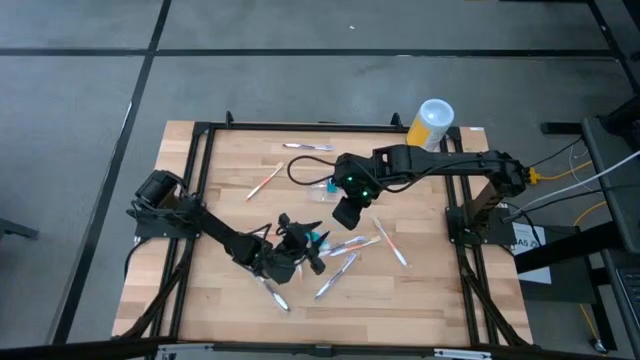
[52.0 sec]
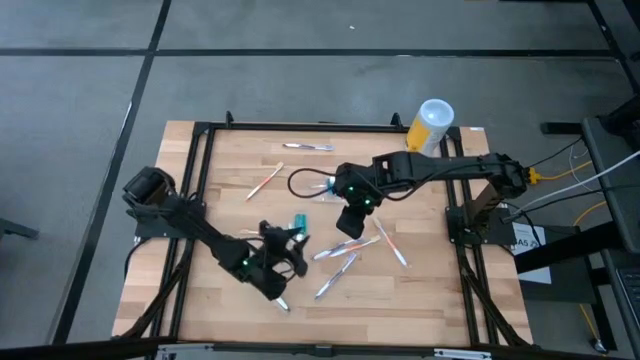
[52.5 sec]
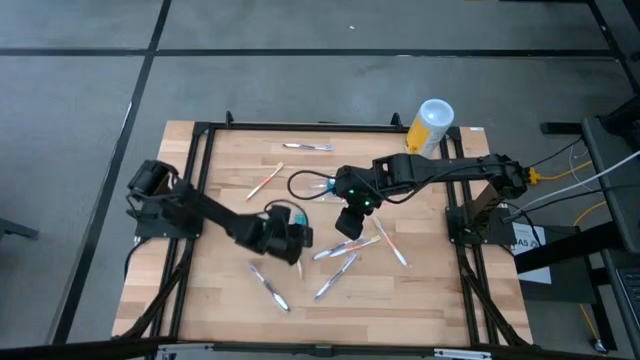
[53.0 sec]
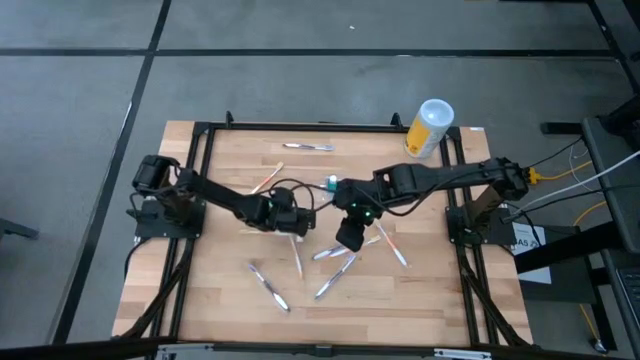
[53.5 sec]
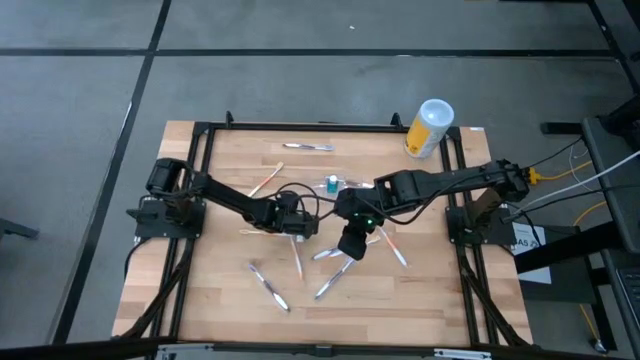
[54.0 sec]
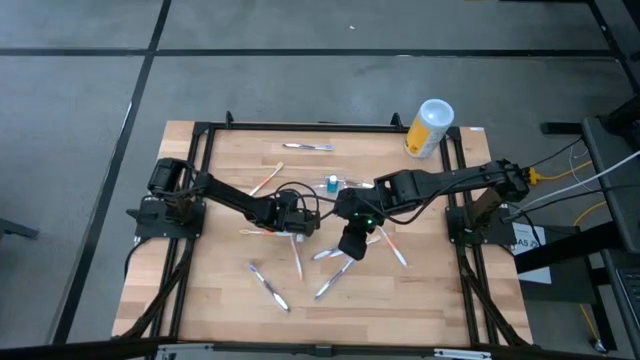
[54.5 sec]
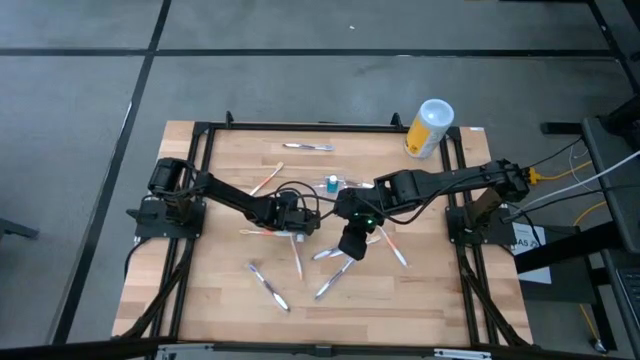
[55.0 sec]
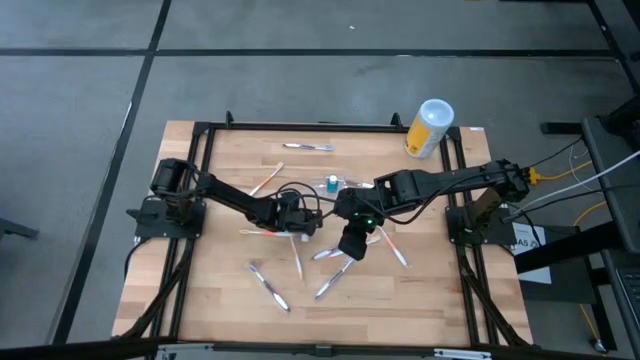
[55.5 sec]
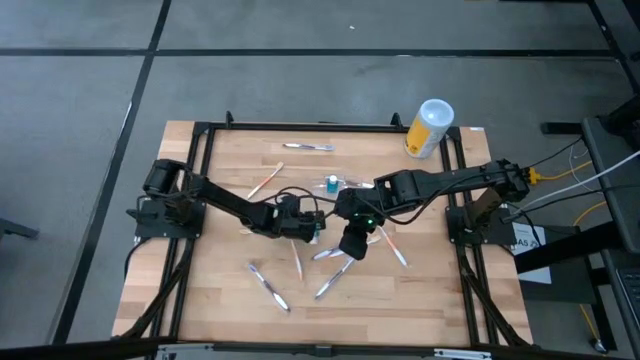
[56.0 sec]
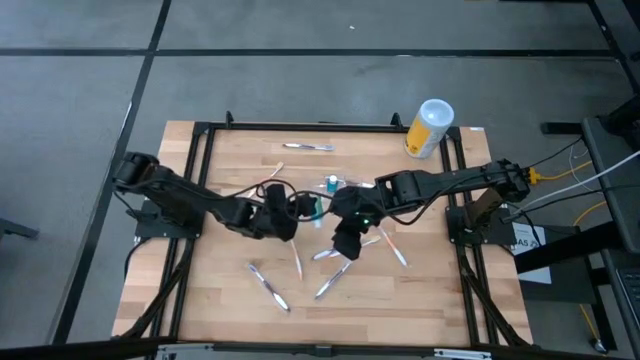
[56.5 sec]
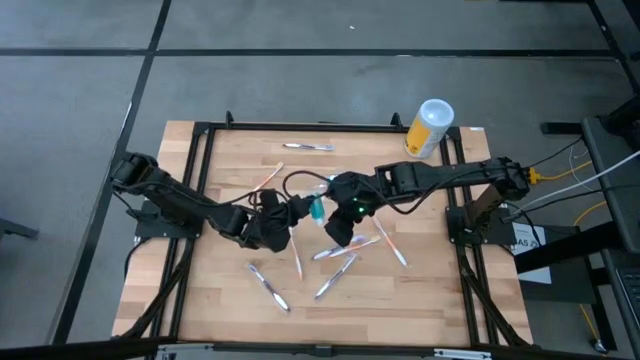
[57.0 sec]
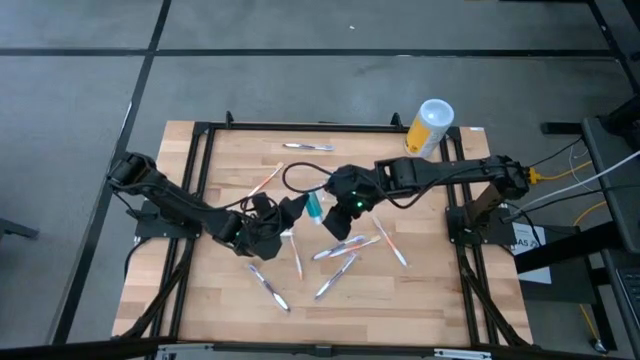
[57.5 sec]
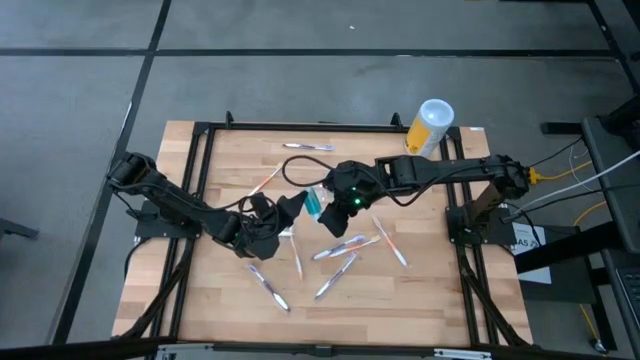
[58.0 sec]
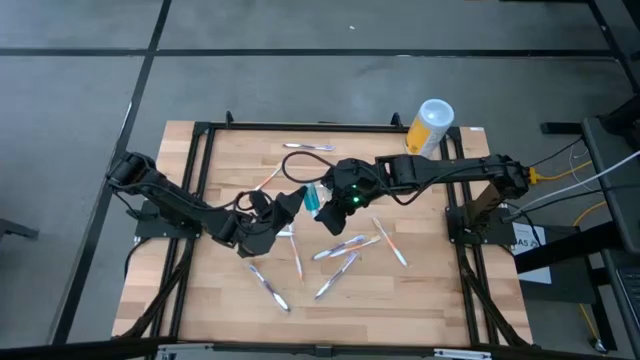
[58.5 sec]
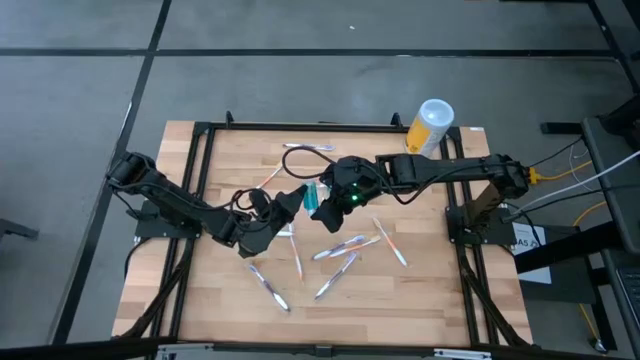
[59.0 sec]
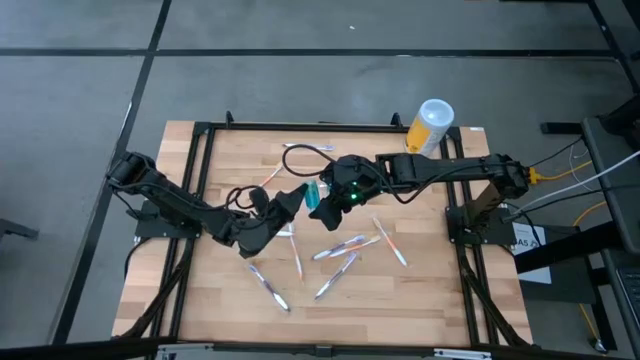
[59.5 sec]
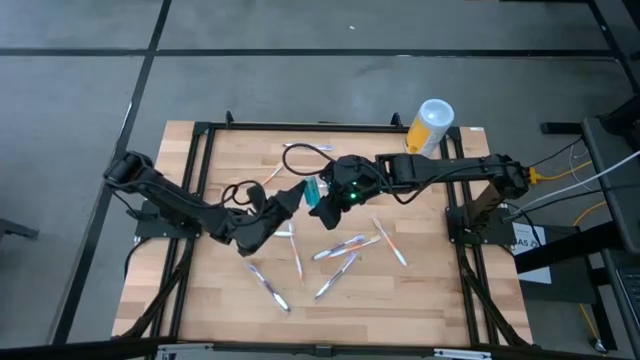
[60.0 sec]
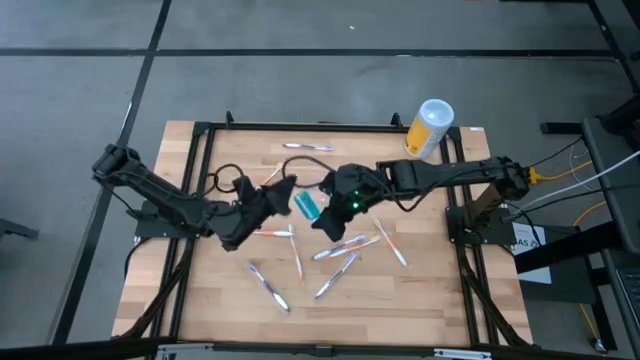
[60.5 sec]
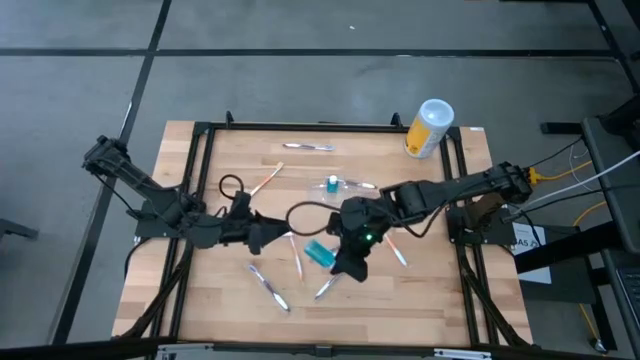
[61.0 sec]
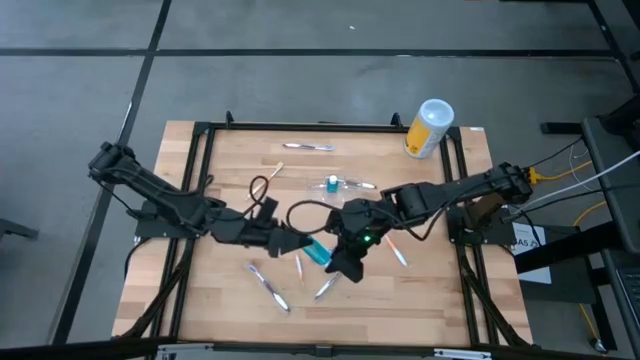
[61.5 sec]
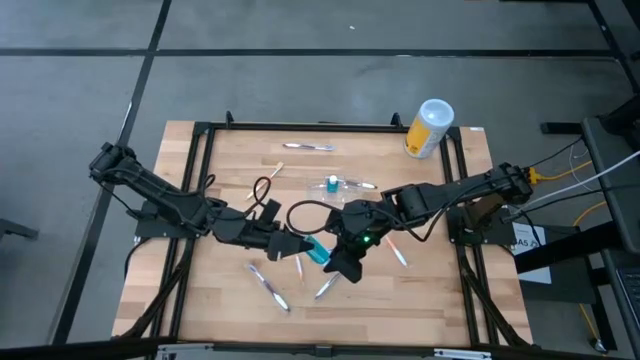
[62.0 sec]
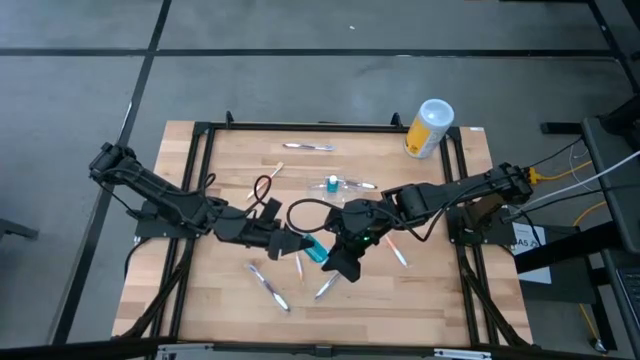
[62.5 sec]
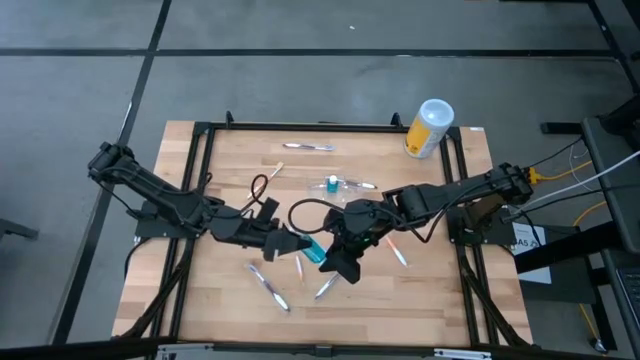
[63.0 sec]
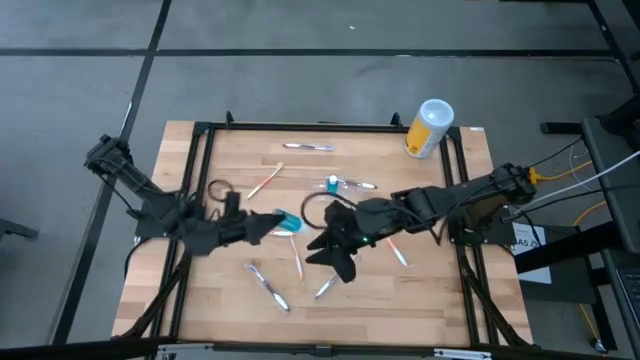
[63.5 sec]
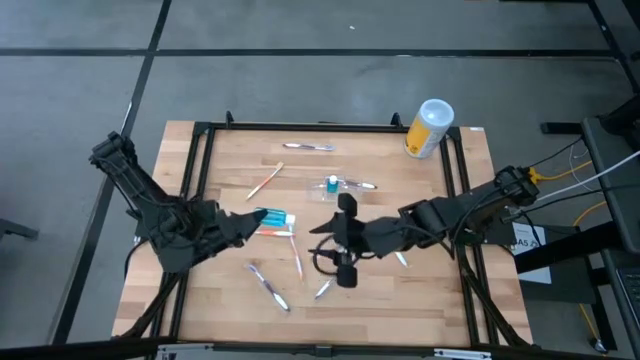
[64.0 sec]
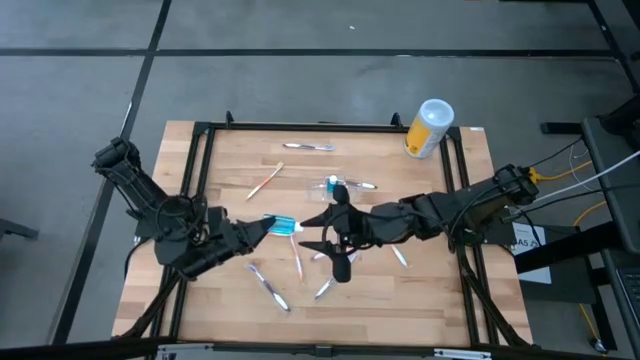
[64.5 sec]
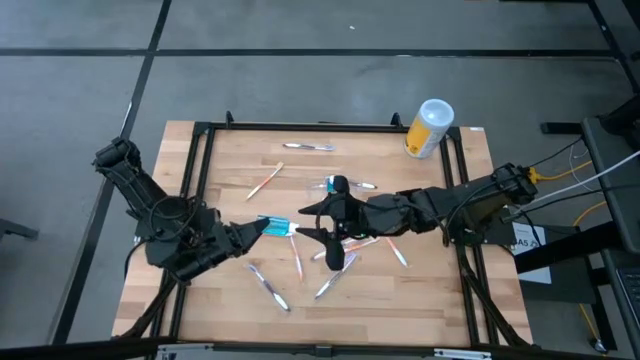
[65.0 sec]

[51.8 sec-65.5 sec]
Task: Pick & Place toothbrushing station
Put the blue mouthwash into the middle section of the transparent organizer

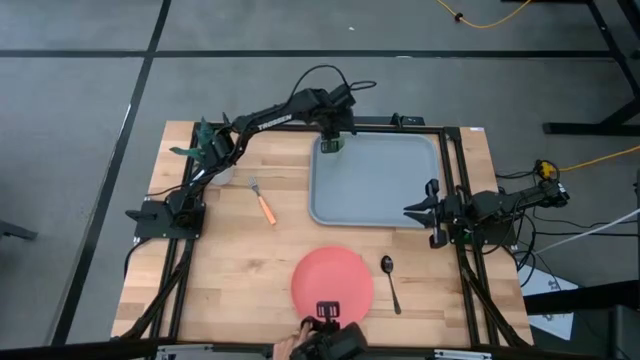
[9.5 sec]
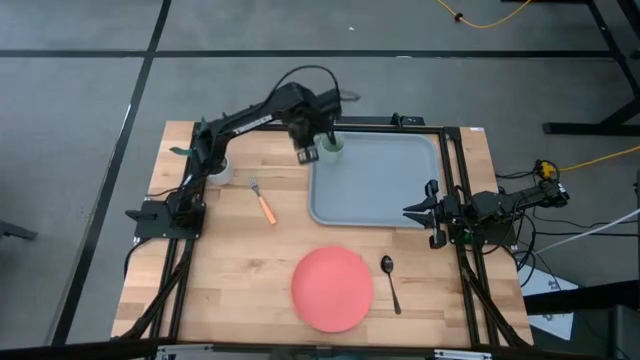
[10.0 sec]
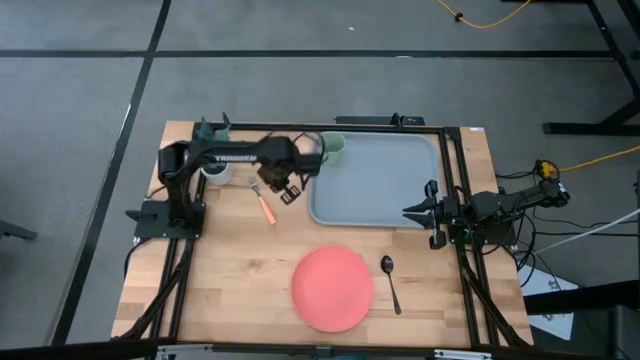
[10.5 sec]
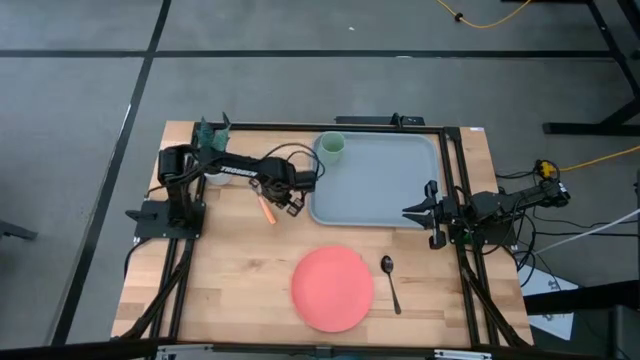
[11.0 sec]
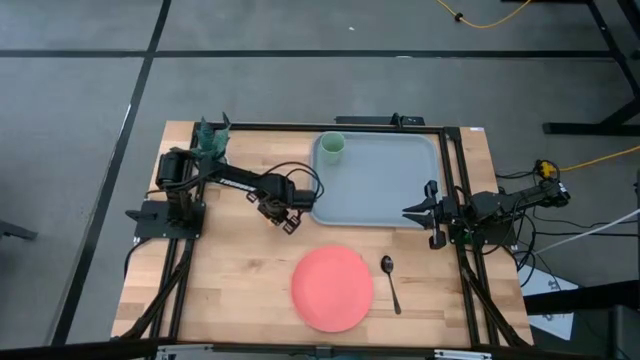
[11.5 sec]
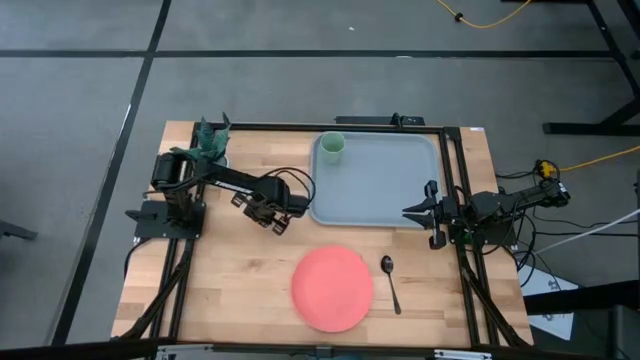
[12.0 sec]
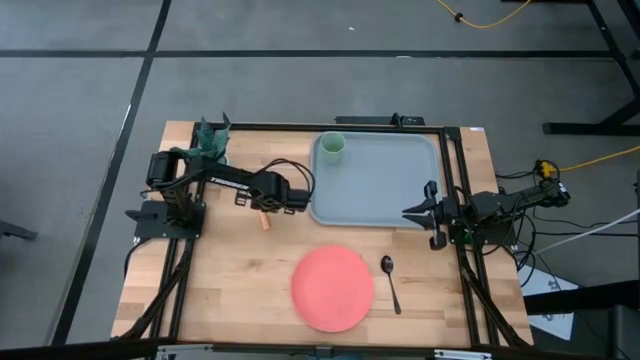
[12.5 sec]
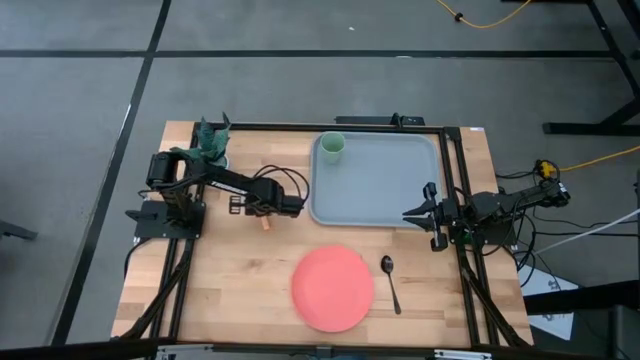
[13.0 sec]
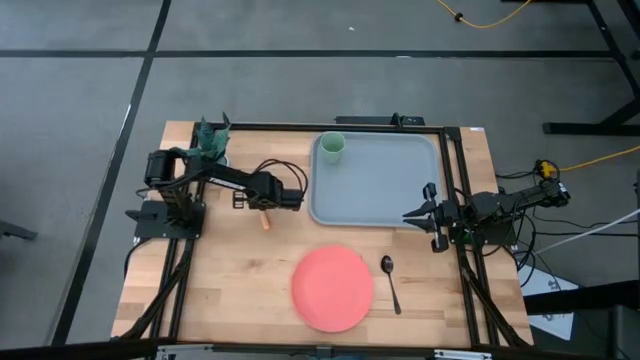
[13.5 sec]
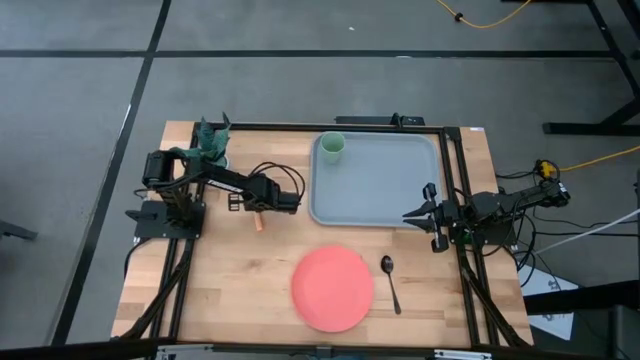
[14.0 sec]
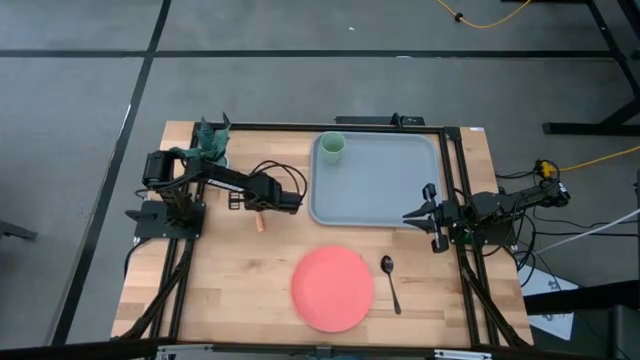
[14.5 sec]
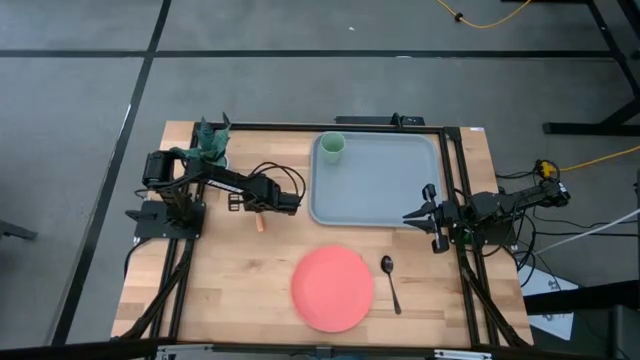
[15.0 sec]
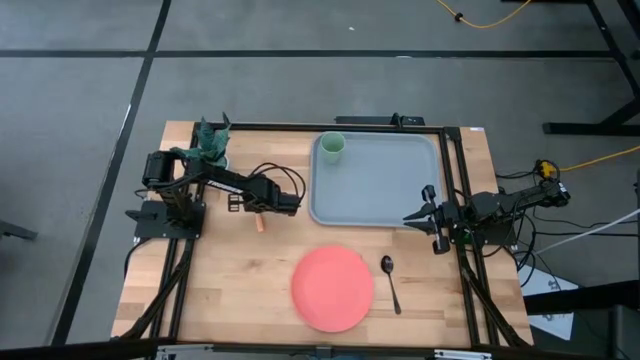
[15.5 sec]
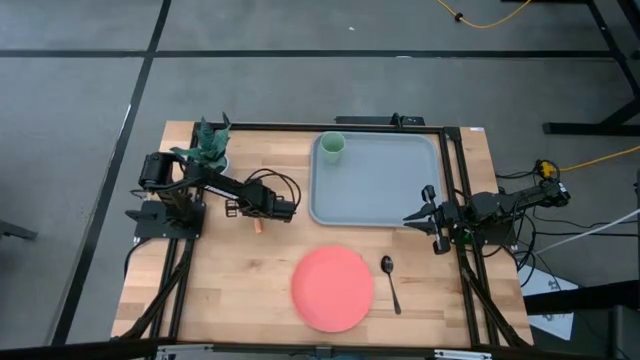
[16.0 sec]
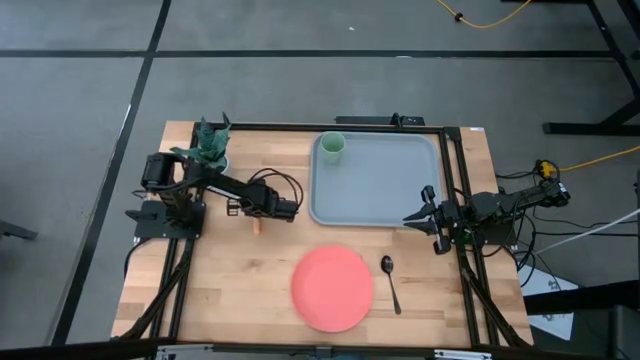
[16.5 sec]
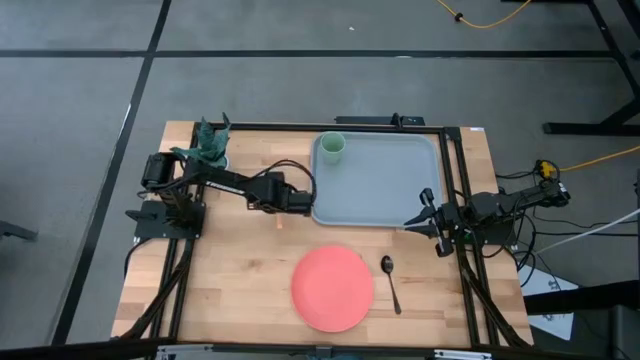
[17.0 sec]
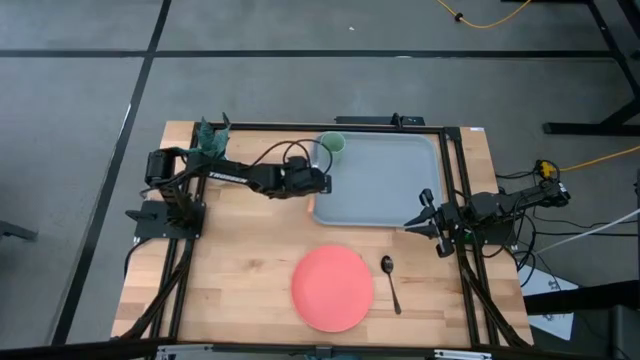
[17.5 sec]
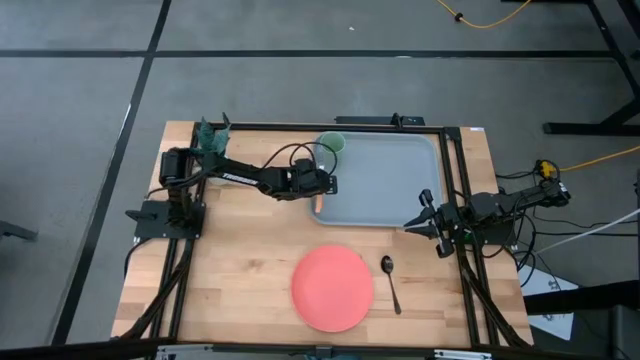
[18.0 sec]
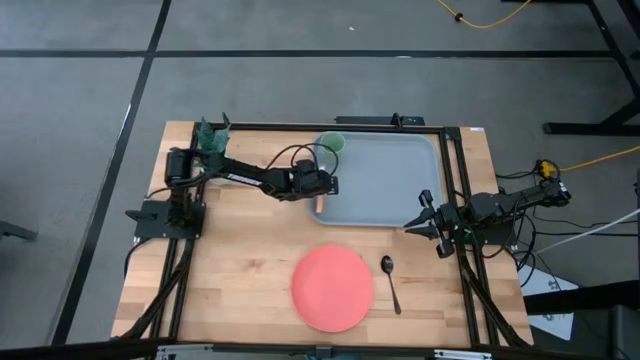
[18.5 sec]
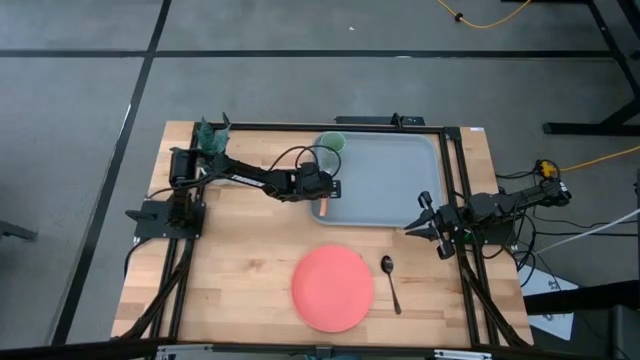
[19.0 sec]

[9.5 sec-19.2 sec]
Task: Pick and place plate/cup/fork/spoon on tray
Put the orange fork to the bottom of the green cup on the serving tray
